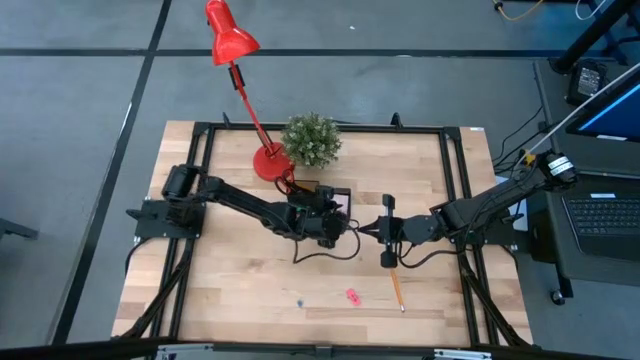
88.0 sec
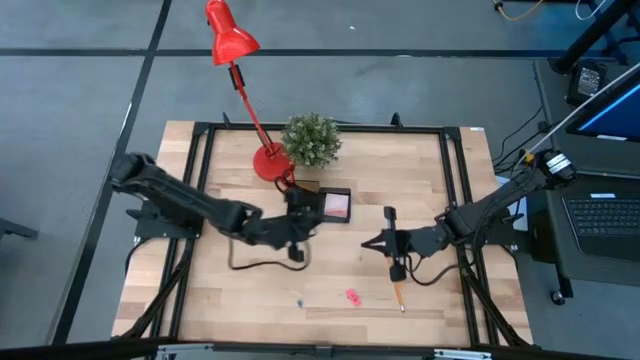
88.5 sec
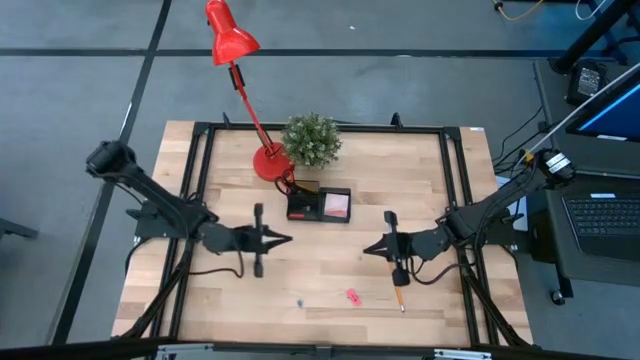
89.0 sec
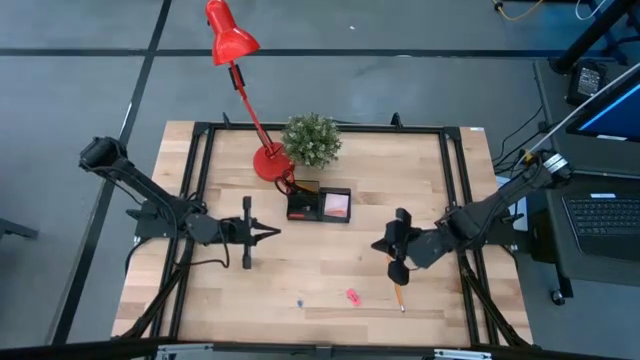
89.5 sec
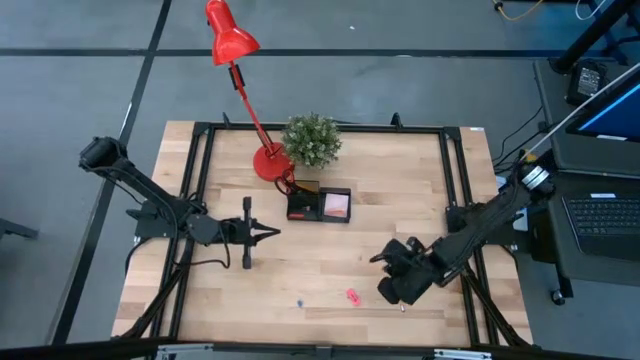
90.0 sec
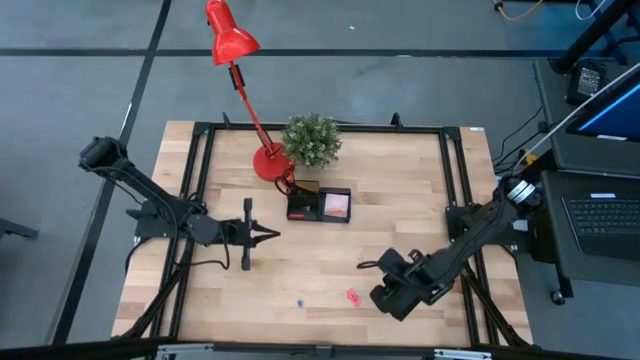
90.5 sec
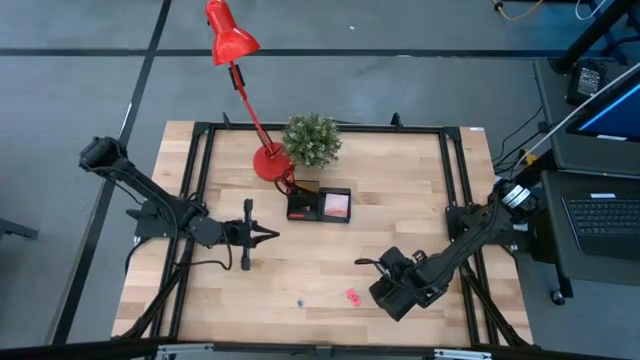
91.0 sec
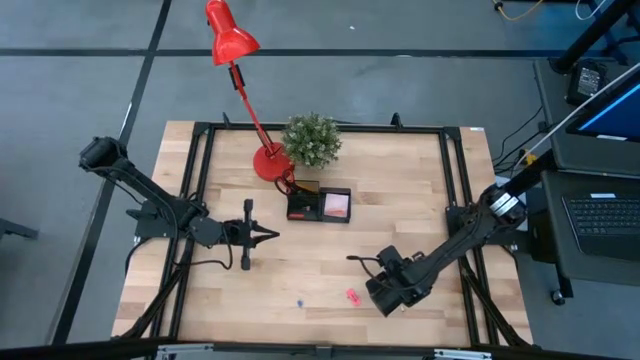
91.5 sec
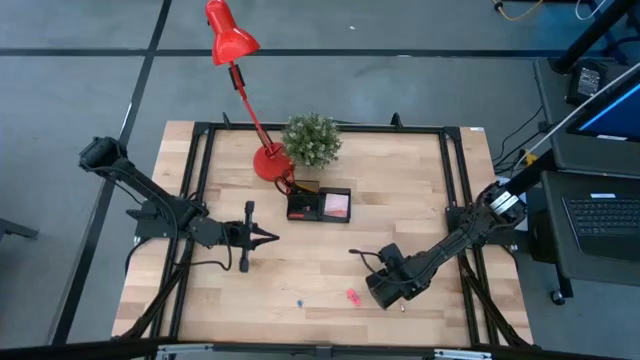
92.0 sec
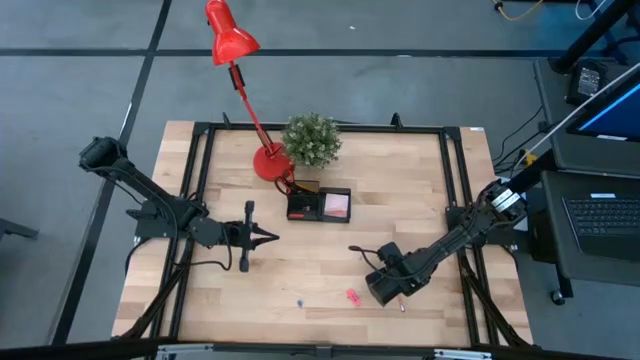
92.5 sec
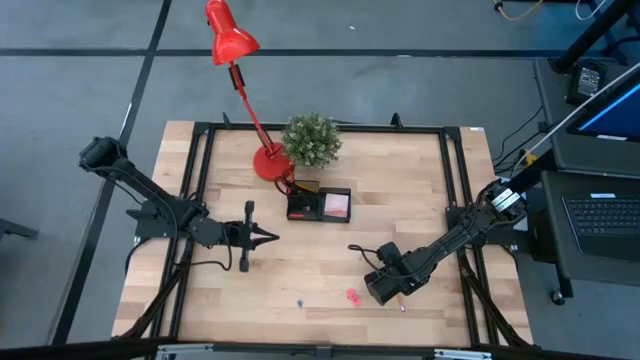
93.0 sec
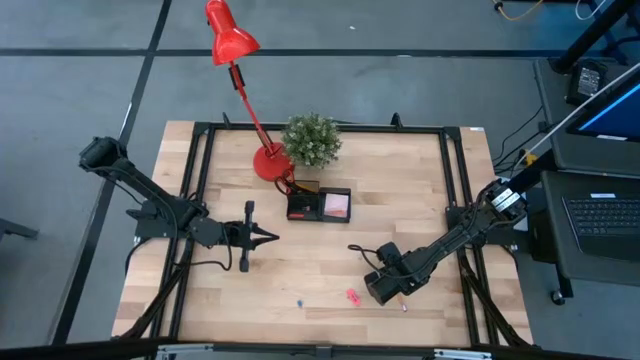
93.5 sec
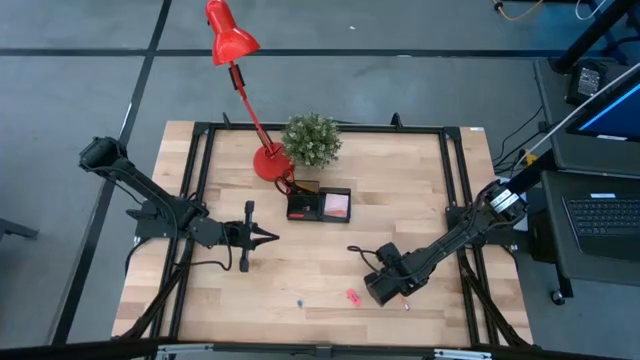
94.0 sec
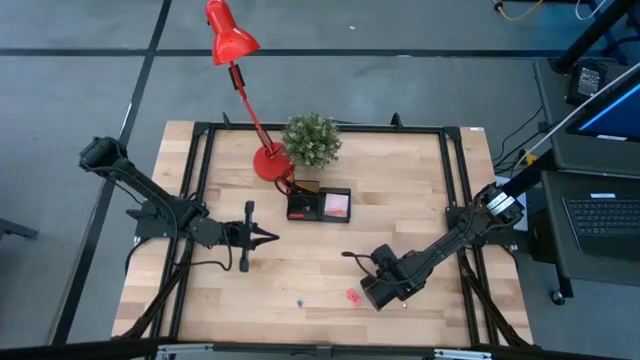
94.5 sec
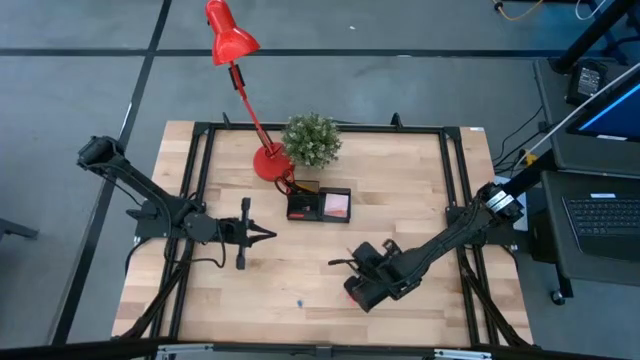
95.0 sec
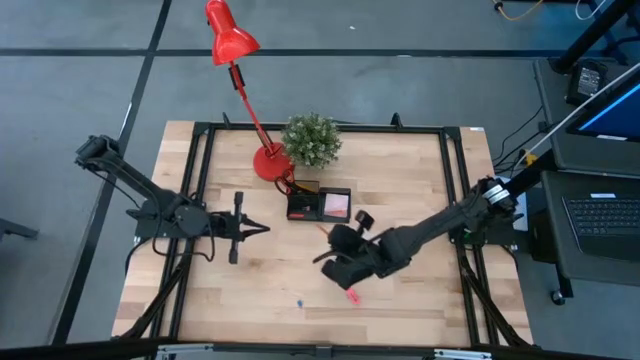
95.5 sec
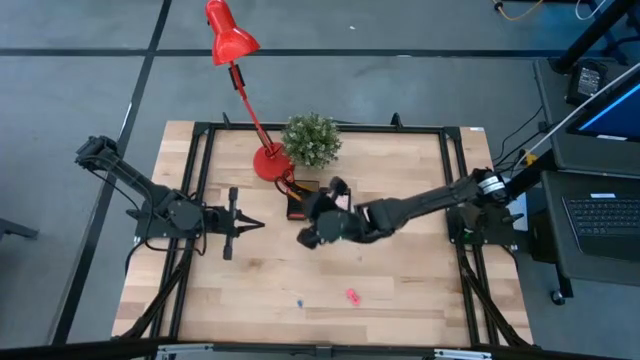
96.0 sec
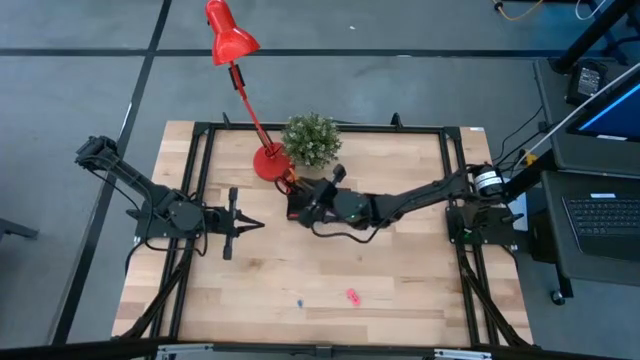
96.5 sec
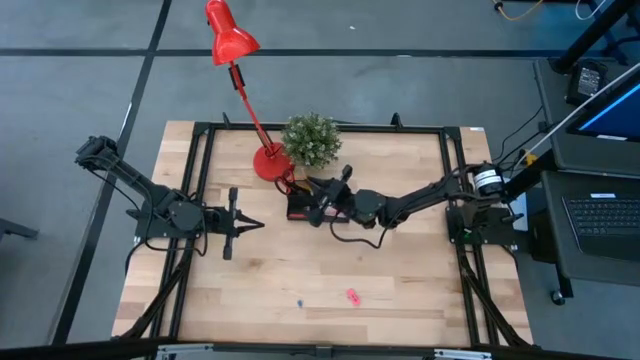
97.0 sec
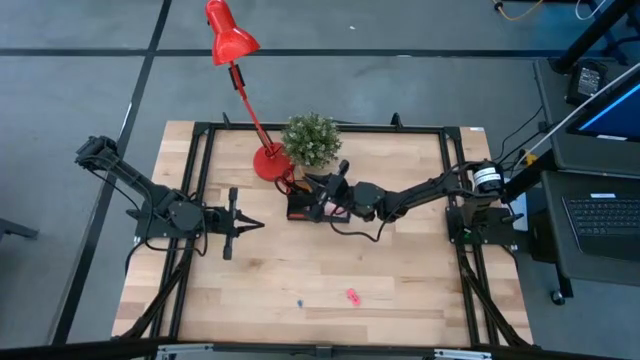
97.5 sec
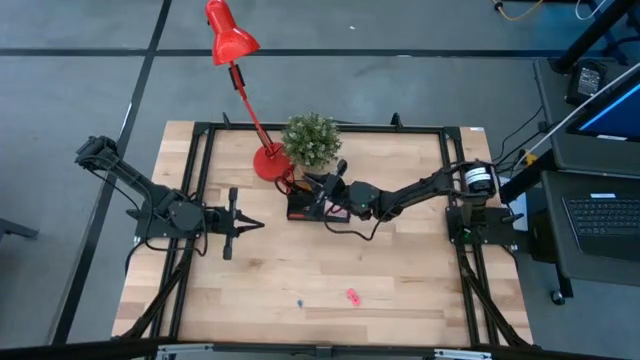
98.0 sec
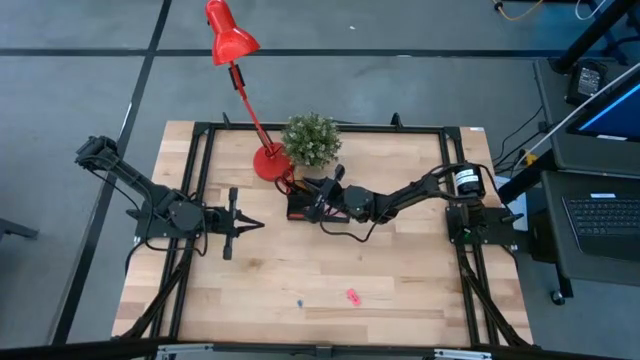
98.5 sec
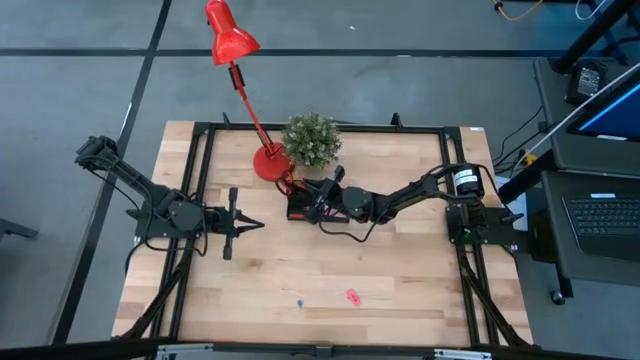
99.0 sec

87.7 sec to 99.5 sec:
Task: Pick and place office supplies into organizer
Put the orange pencil into the black desk organizer

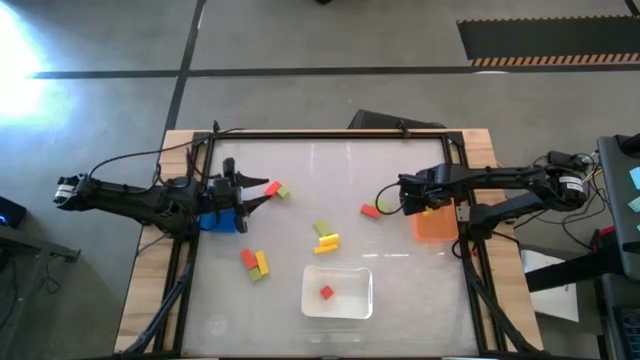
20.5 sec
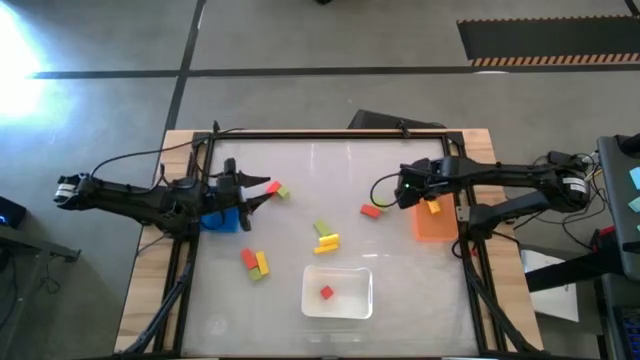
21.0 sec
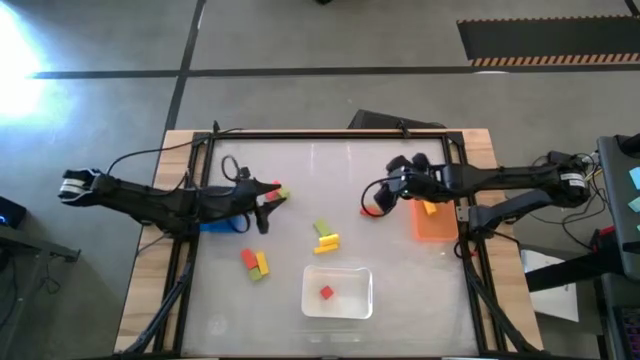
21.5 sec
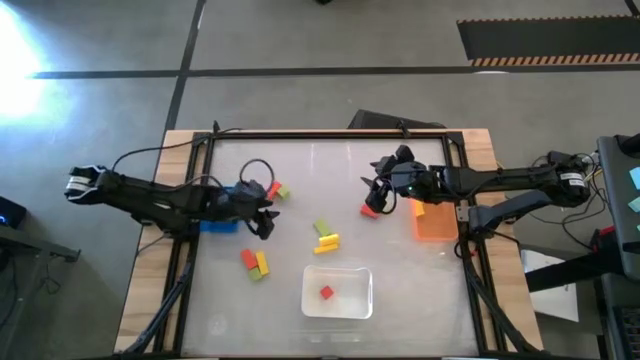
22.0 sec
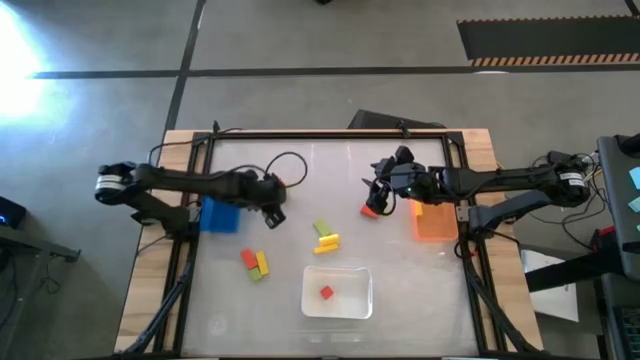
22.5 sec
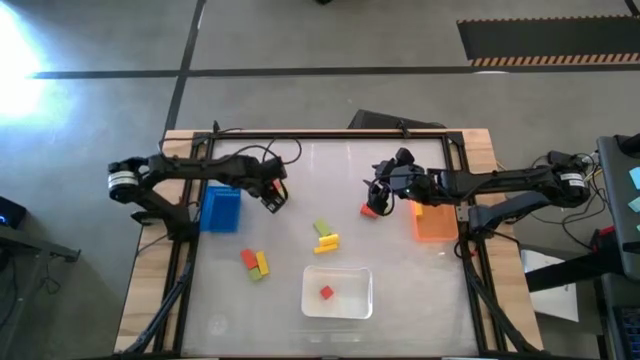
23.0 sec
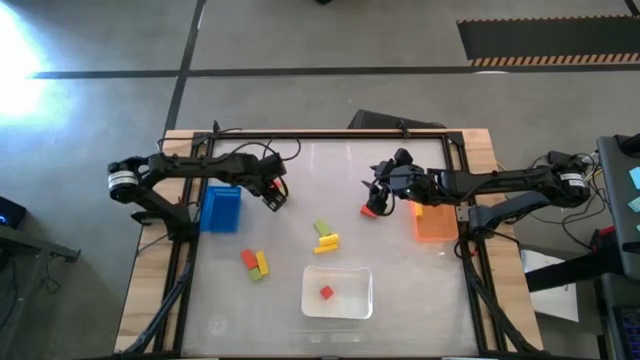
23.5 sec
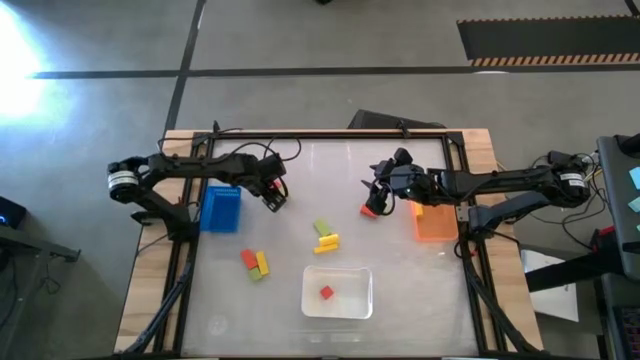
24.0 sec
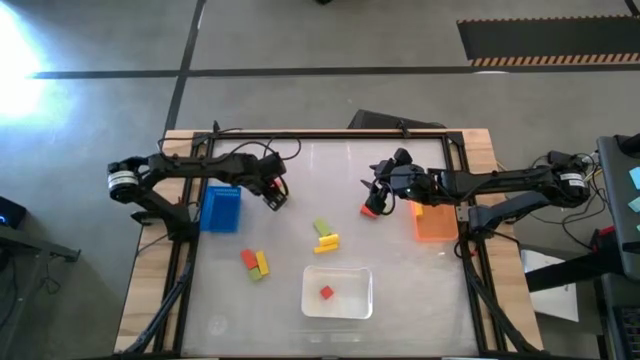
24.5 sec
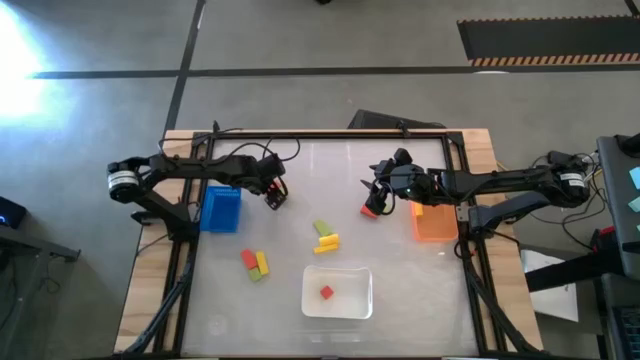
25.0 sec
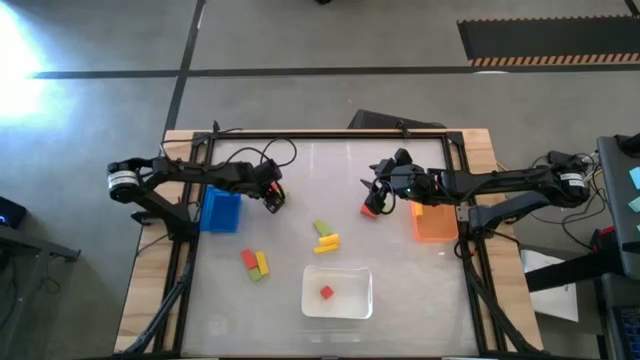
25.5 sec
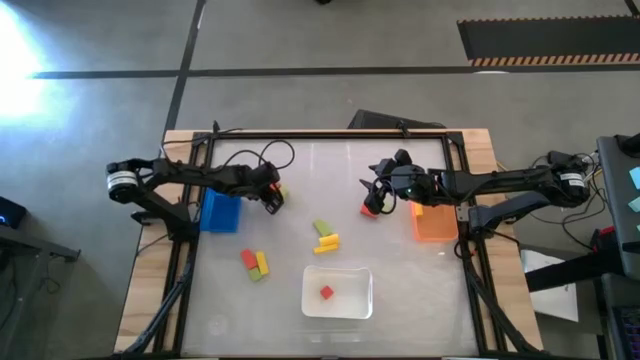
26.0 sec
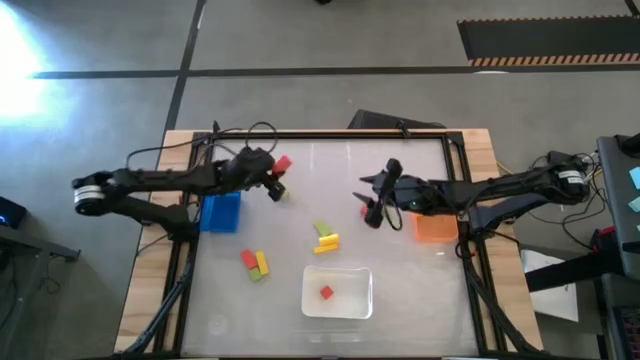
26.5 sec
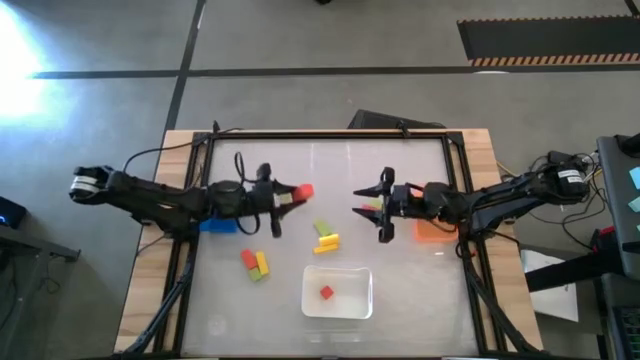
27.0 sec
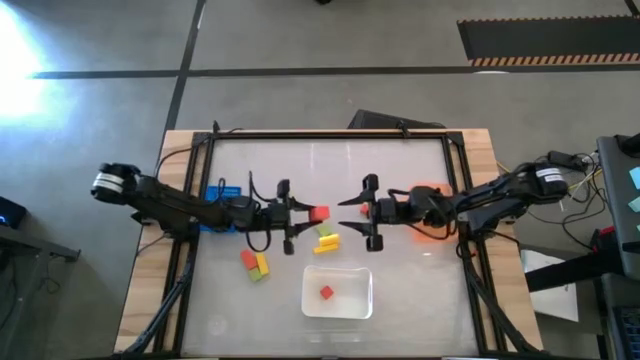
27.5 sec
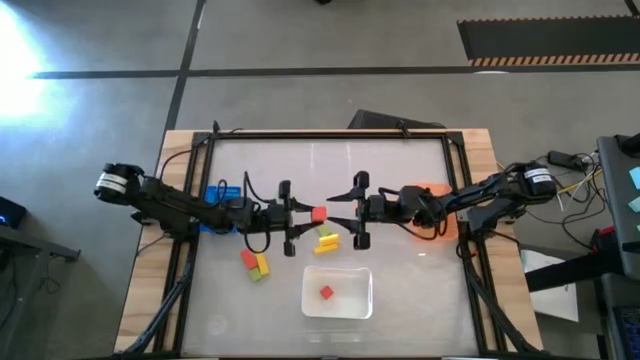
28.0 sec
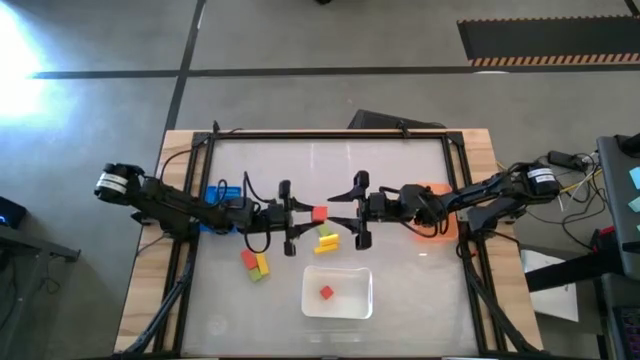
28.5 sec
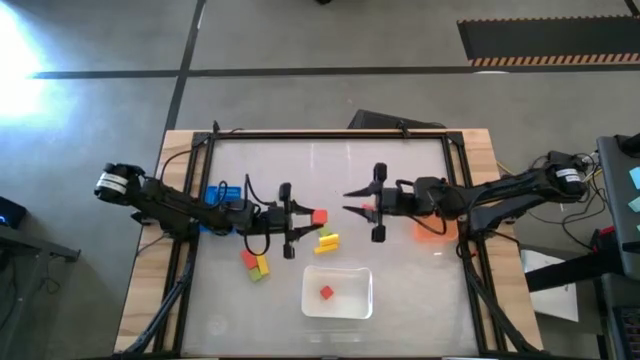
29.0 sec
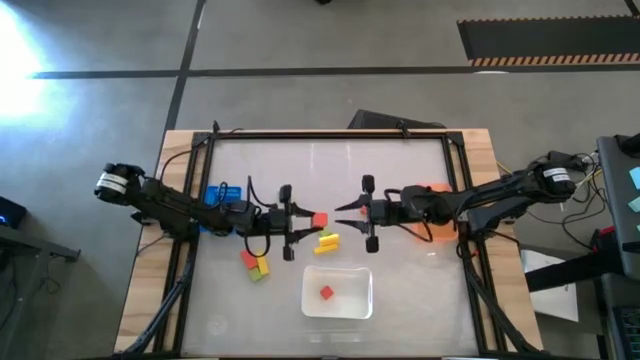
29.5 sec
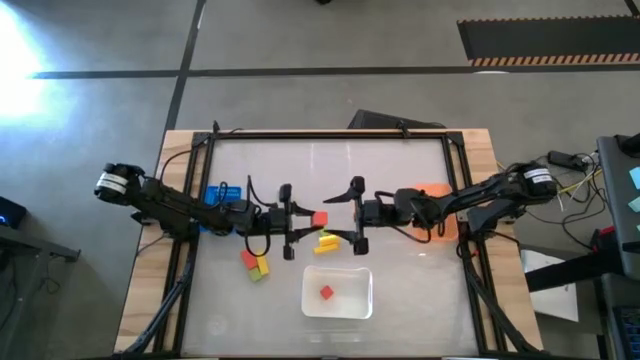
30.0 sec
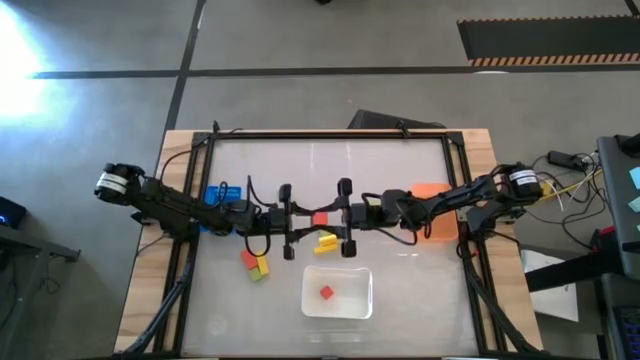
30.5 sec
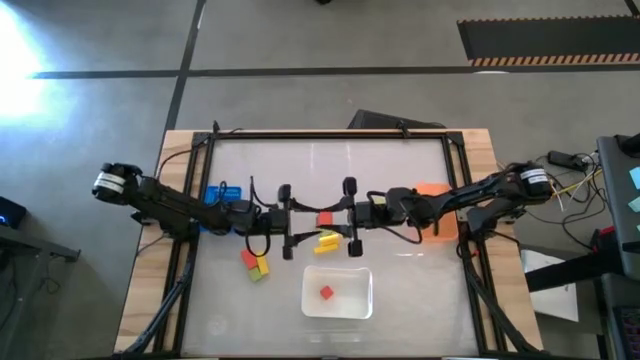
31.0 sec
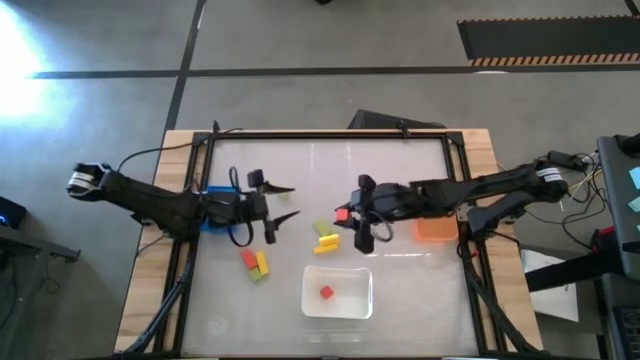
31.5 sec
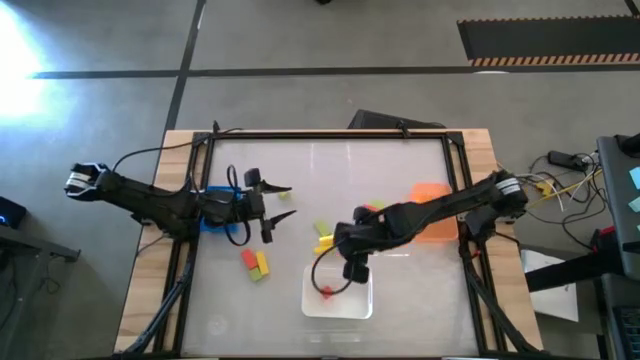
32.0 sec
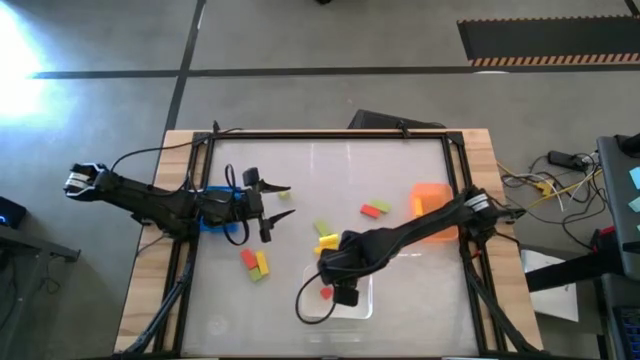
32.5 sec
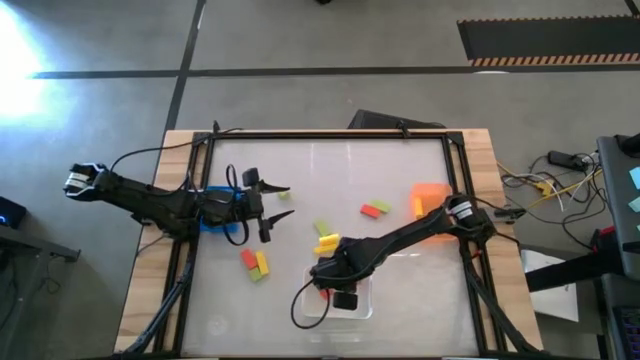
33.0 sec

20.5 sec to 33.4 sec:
Task: Sort & place blocks by color
Put the orange block into the white bin
